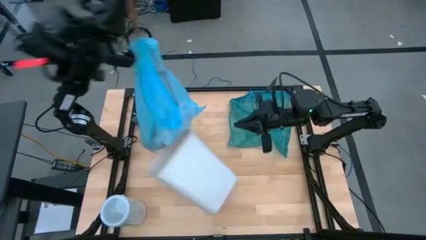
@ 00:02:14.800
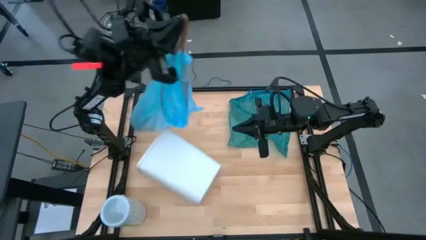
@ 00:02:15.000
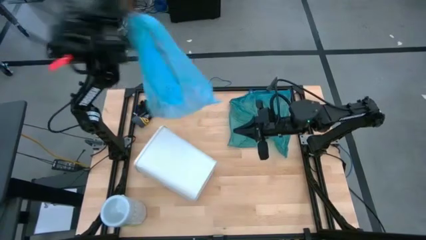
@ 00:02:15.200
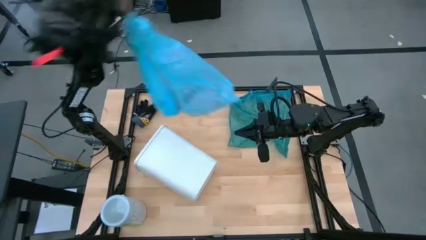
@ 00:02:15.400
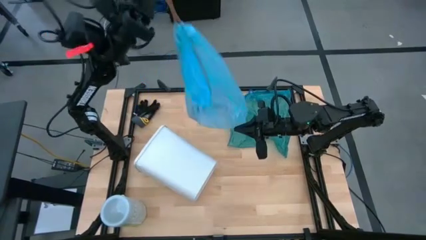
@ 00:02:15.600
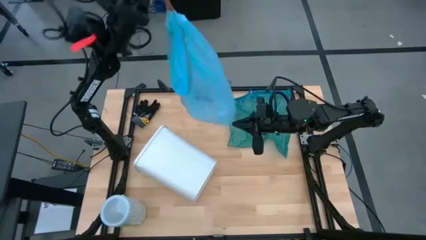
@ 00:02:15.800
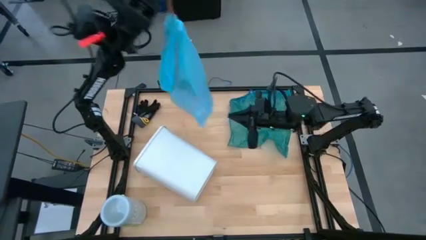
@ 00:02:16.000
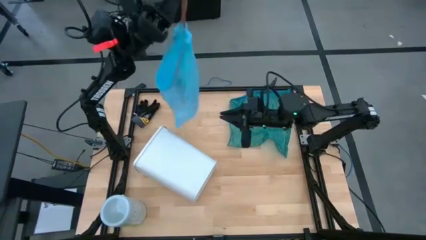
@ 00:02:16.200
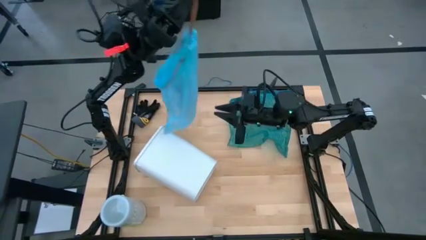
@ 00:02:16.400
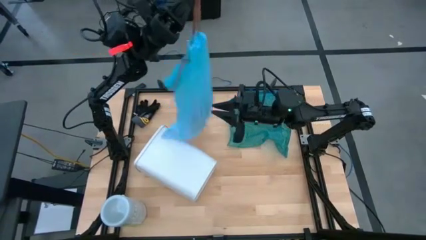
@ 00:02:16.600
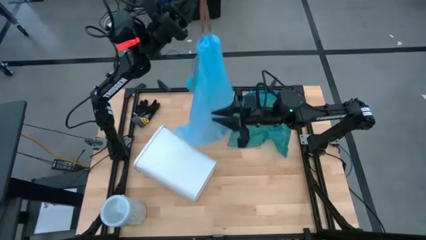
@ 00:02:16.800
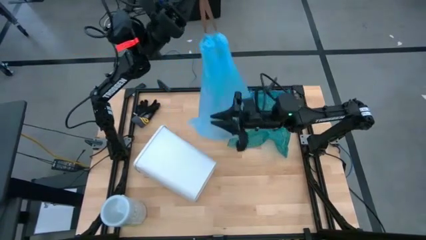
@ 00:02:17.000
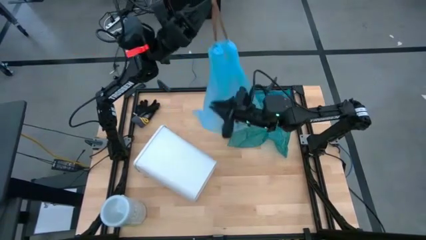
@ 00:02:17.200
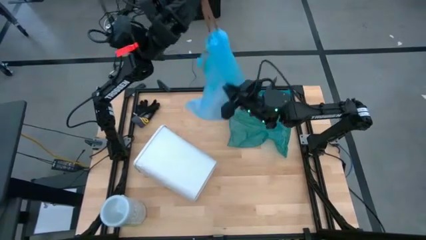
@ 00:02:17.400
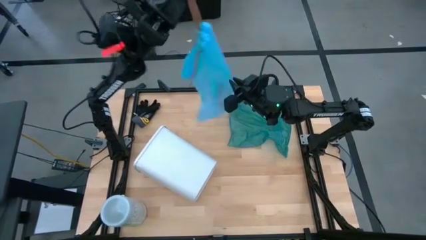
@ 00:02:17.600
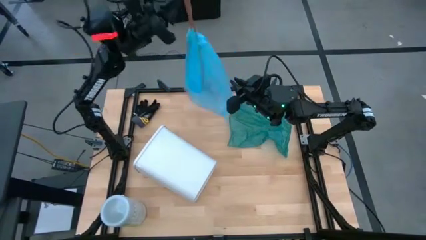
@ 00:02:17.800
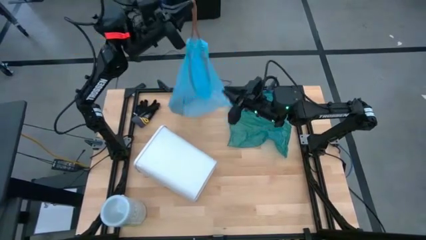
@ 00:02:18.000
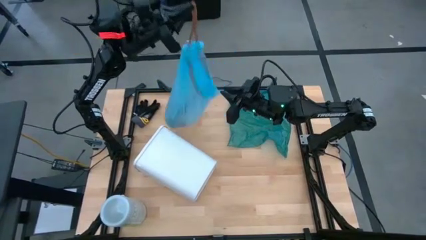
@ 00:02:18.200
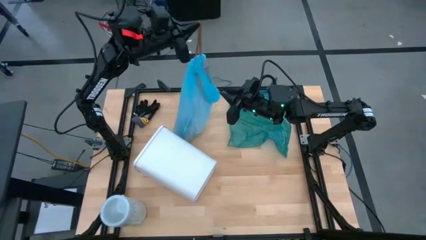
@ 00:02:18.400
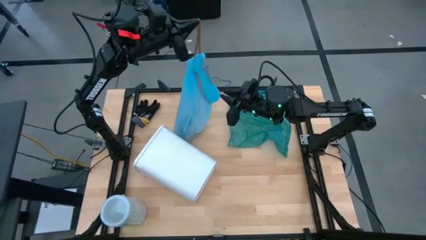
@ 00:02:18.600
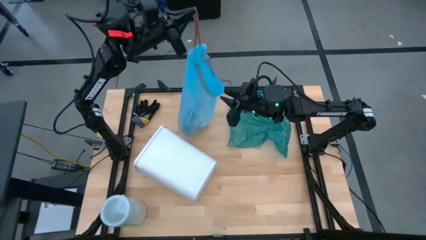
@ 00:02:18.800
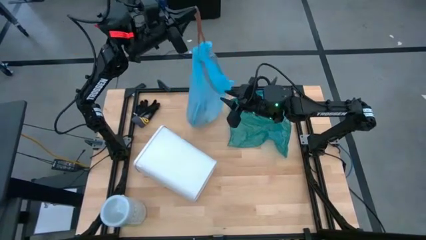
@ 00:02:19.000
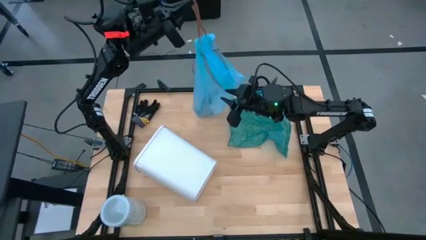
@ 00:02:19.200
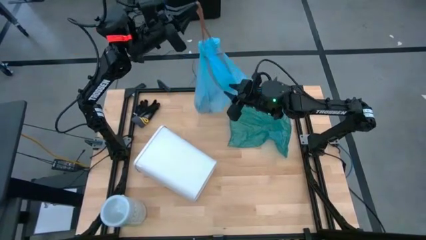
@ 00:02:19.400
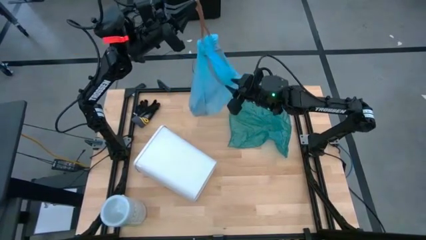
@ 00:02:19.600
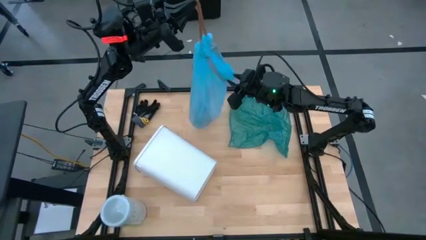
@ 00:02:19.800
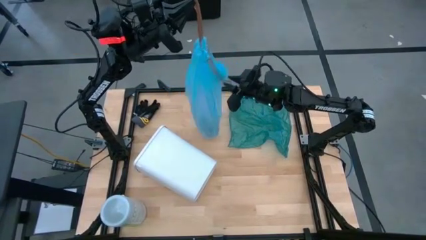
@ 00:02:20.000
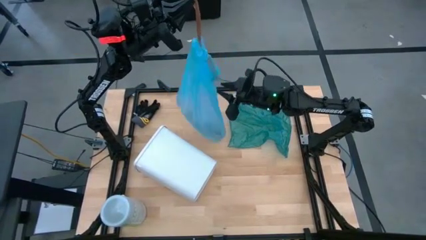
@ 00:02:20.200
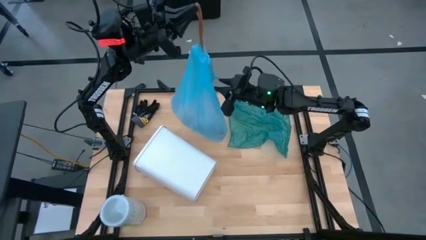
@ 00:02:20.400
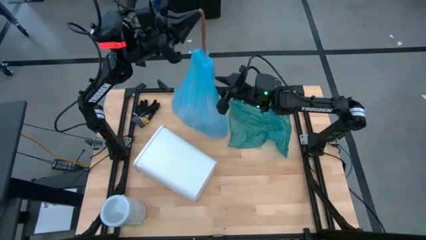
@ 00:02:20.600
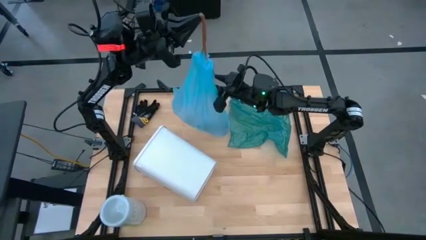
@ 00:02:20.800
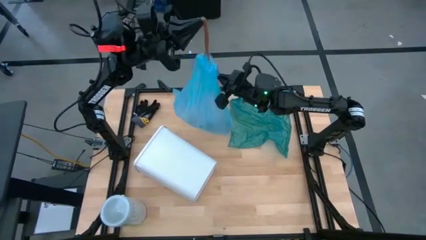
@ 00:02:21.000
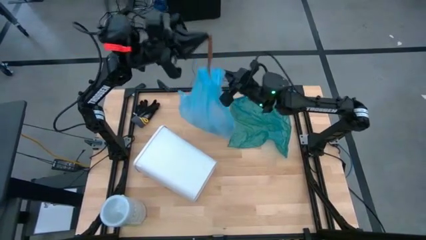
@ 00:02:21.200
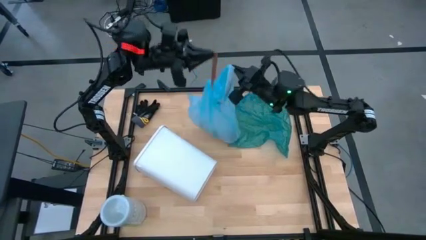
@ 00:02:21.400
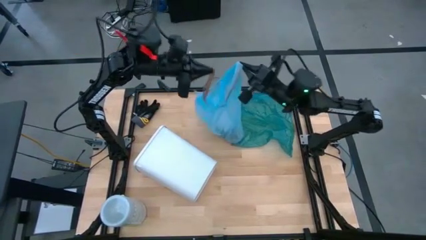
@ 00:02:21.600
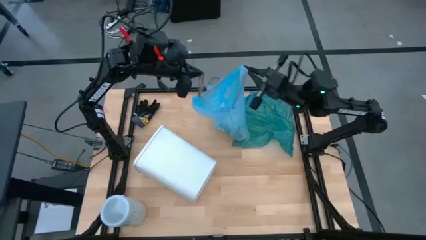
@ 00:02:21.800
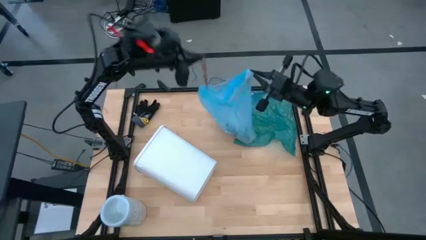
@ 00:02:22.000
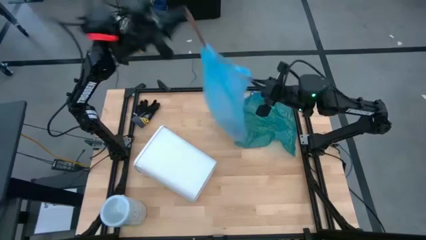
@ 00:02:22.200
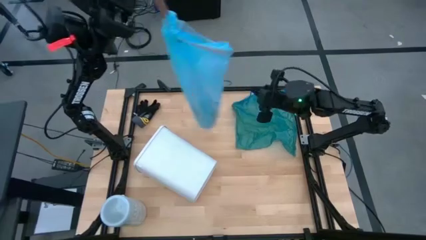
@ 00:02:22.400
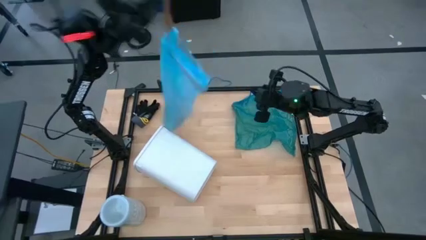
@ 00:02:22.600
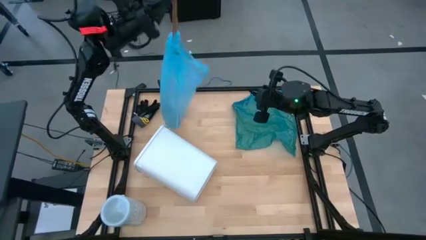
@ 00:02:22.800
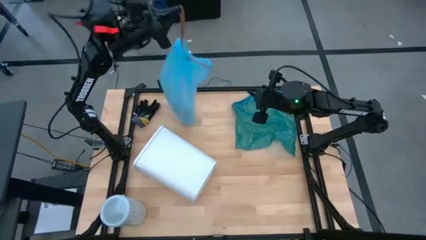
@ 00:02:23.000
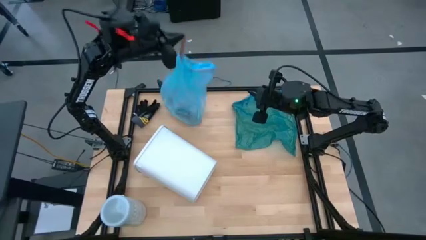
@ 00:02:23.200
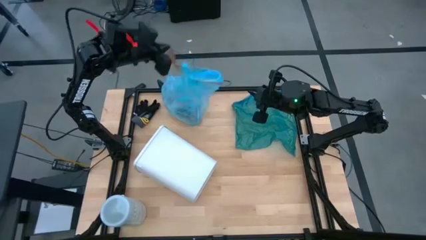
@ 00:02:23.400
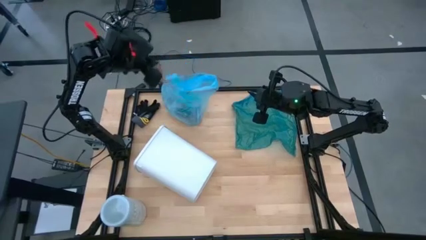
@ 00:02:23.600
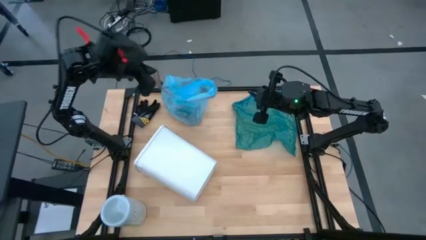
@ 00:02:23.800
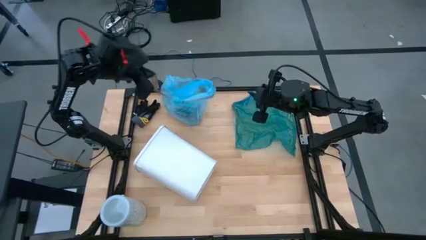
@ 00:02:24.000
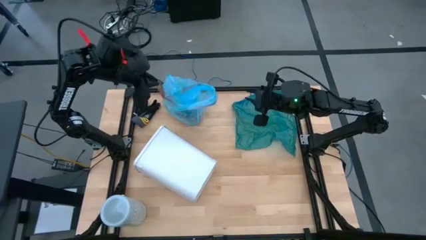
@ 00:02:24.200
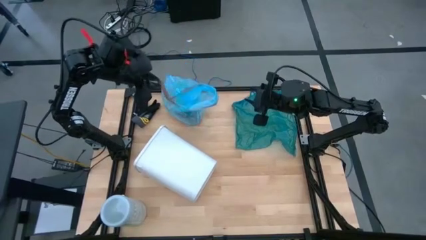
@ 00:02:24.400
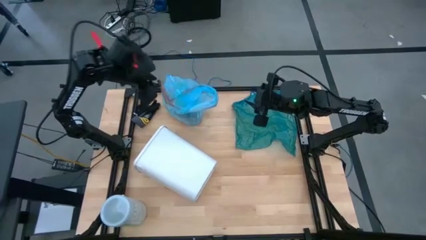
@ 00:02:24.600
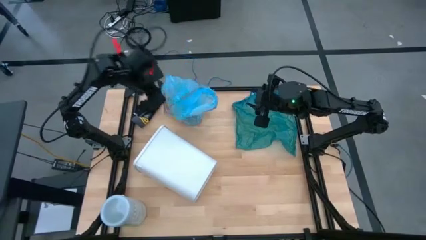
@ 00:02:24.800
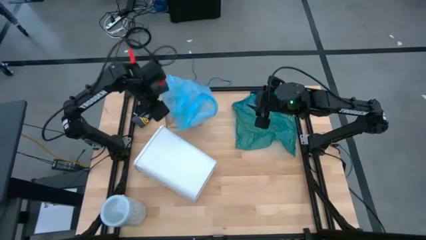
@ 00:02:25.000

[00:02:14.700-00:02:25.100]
Task: place trash/remove bag and relplace
Remove the blue plastic trash bag from the trash bin
